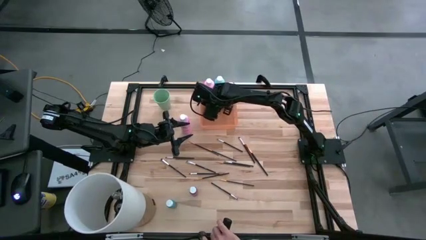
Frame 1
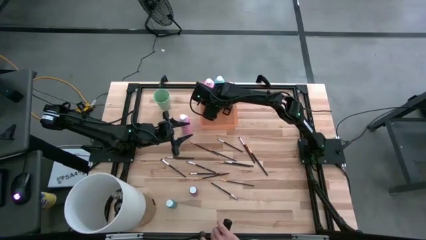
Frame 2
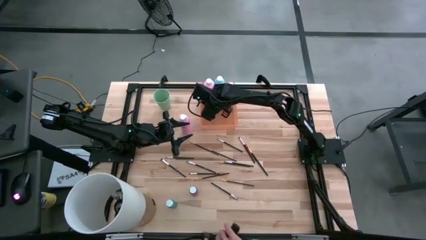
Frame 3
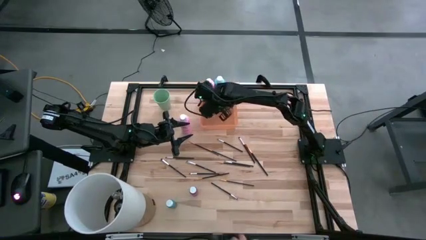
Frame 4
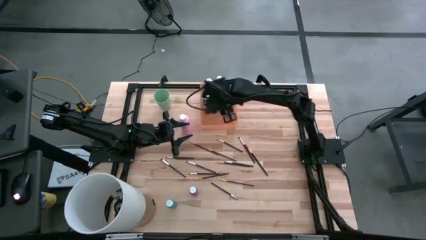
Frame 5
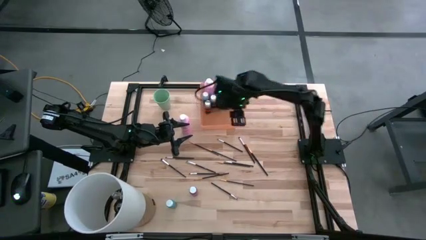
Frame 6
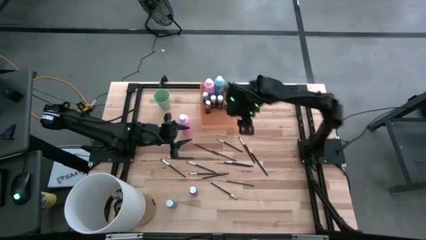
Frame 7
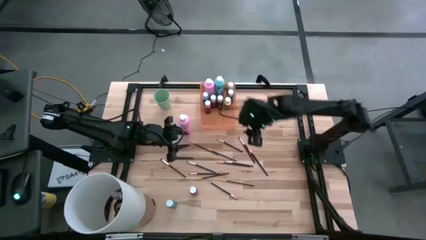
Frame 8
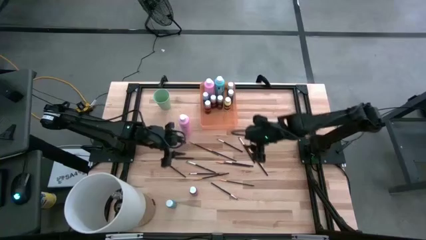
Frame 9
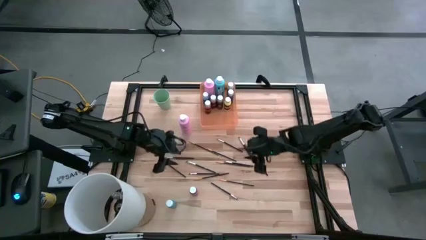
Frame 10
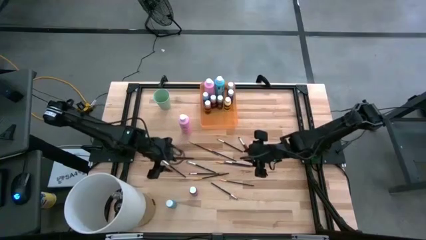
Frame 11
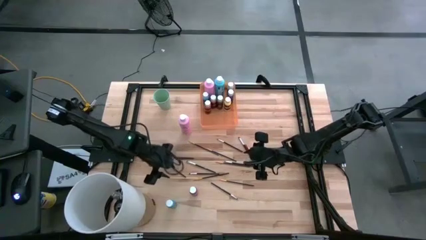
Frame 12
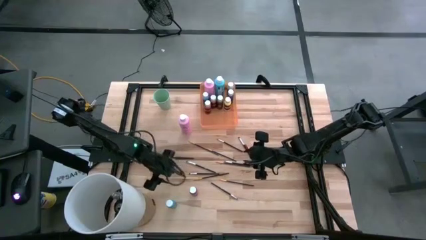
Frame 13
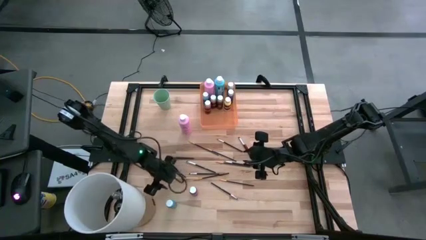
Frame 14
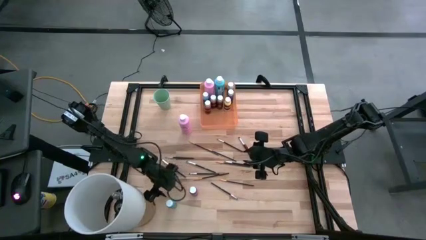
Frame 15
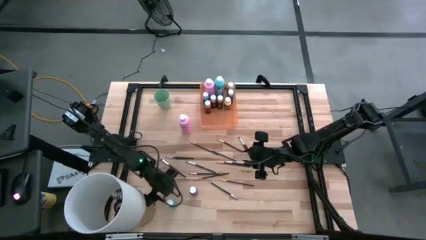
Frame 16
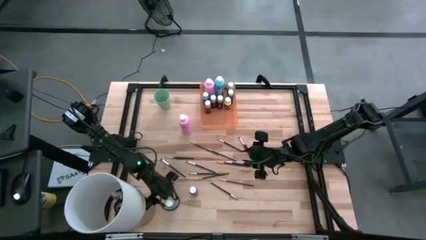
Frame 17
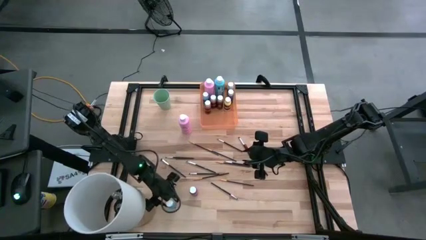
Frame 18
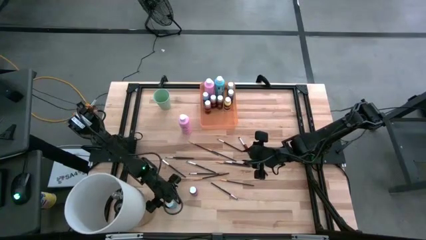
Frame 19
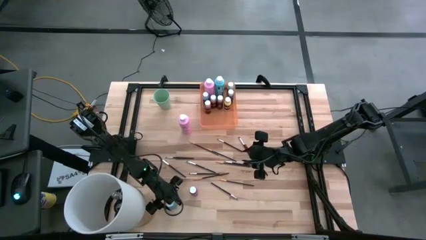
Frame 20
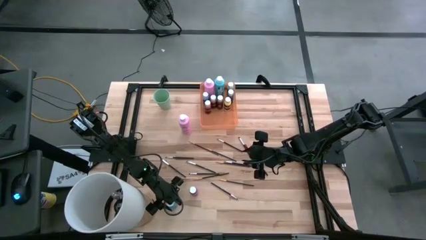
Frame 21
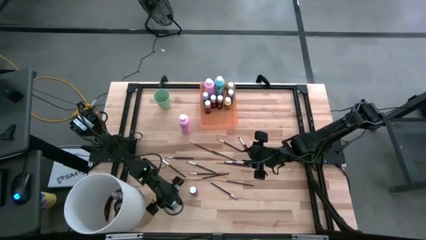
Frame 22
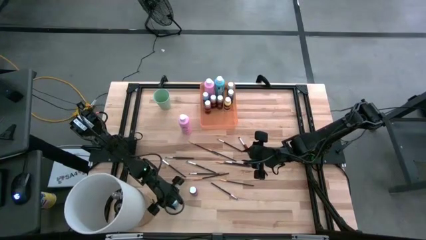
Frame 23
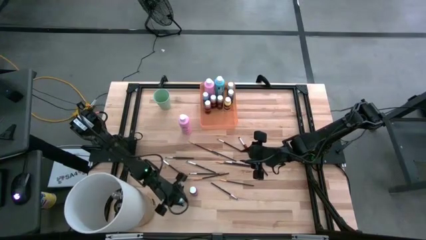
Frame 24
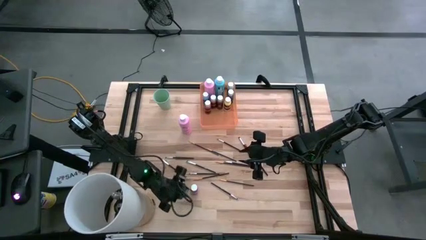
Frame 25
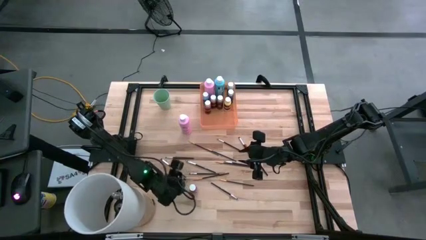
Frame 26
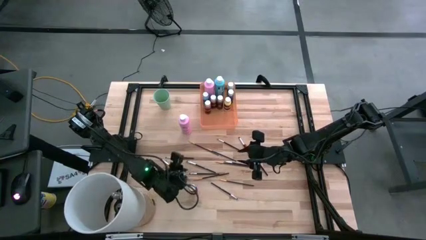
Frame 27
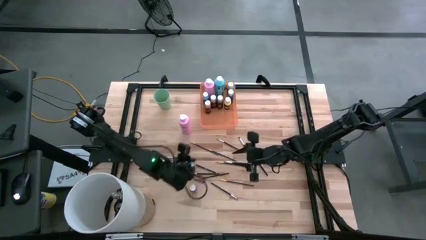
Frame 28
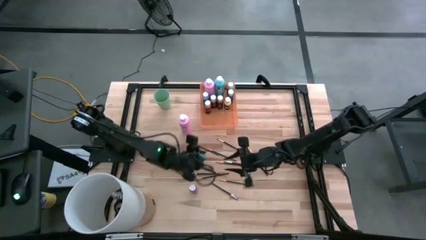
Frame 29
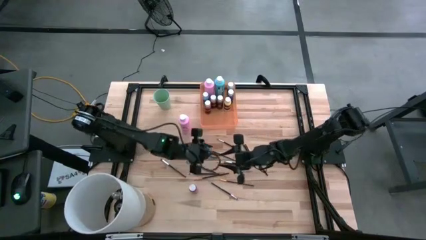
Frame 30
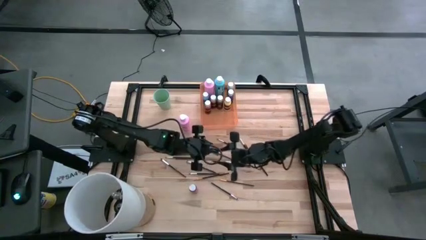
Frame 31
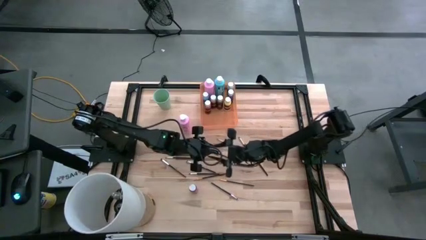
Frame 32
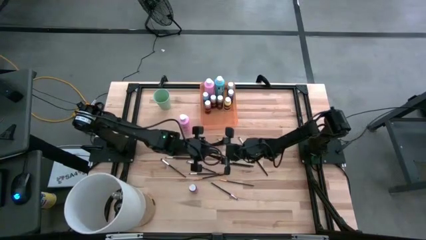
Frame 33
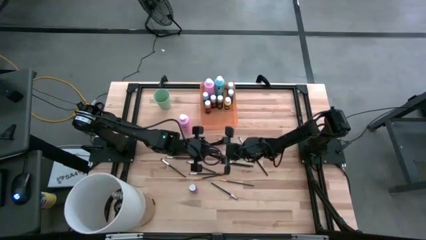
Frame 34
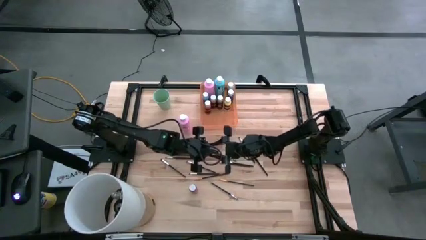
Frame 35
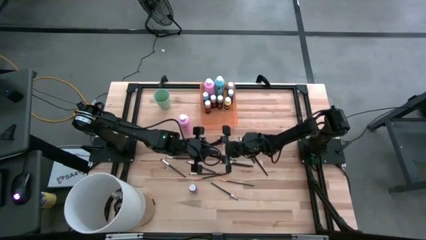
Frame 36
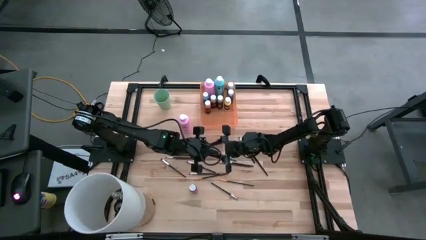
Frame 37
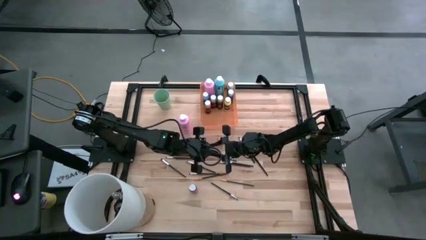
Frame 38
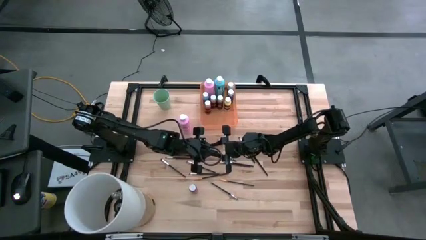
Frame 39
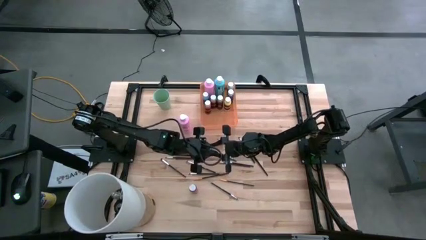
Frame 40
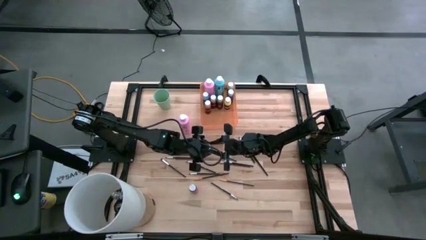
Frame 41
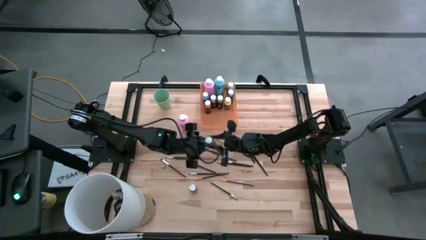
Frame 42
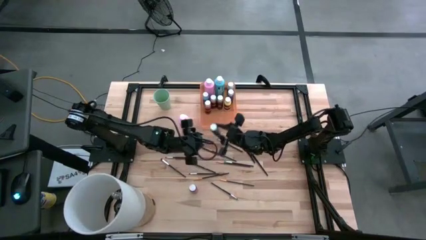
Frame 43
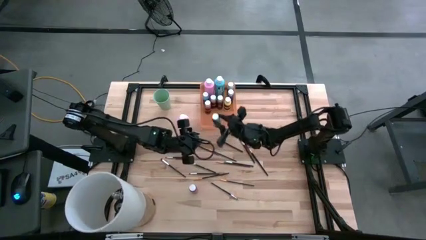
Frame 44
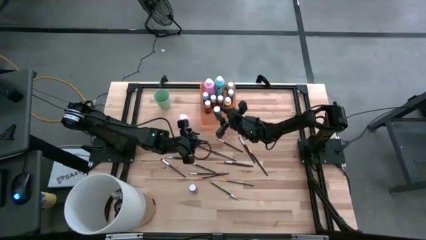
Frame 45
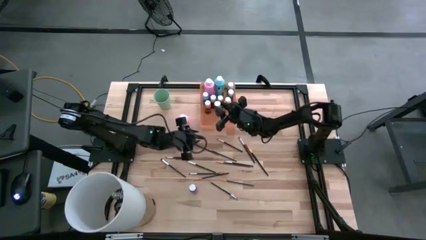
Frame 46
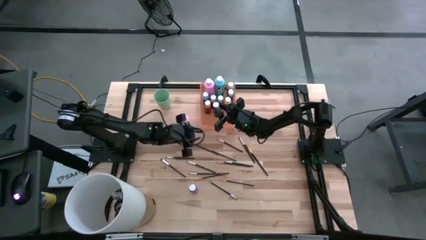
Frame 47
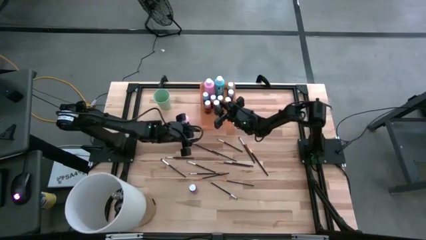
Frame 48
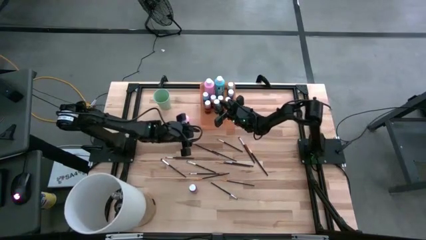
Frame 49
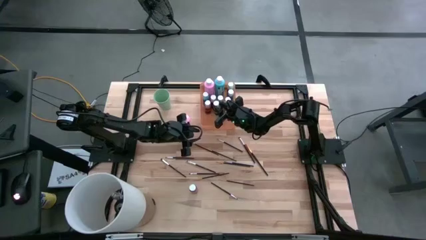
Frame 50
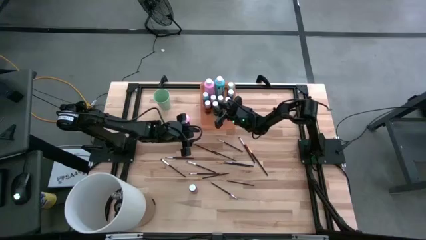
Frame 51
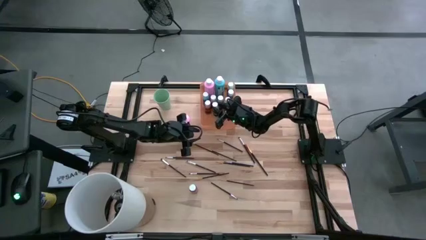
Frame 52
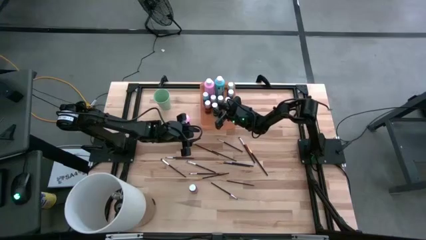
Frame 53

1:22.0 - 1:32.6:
Task: Pick & Place Paint Supplies
Put the blue paint bottle into the orange bin
